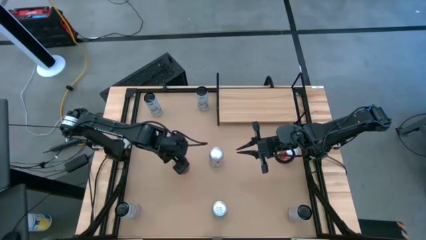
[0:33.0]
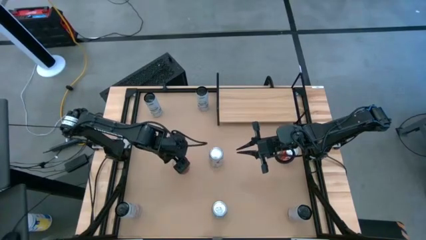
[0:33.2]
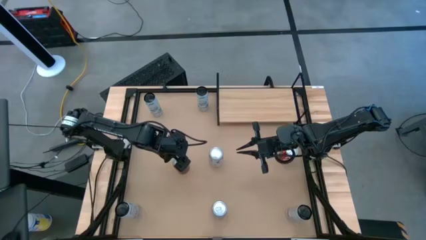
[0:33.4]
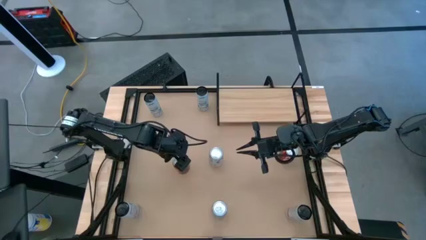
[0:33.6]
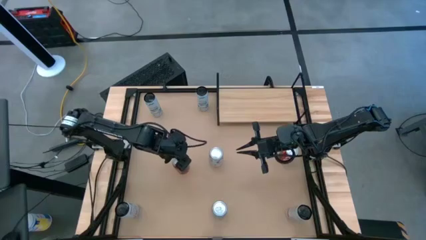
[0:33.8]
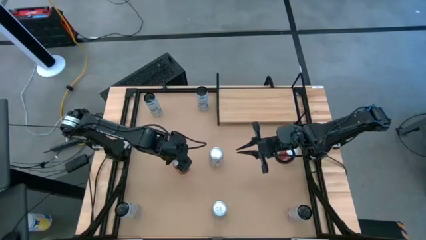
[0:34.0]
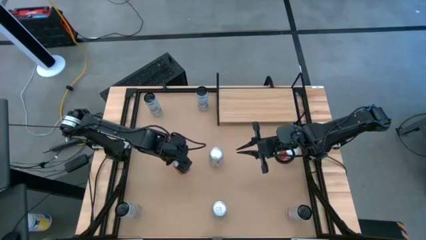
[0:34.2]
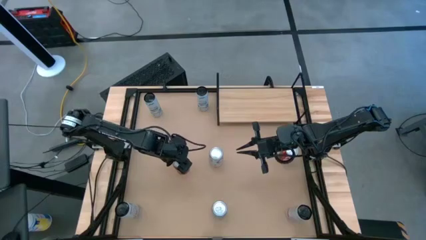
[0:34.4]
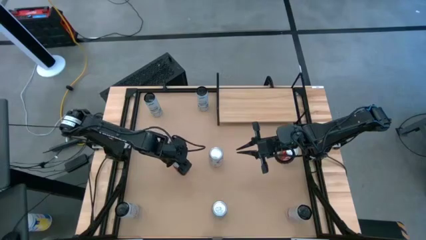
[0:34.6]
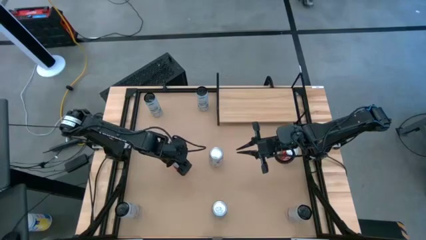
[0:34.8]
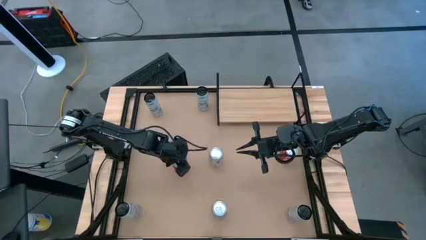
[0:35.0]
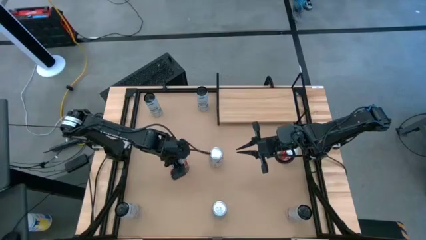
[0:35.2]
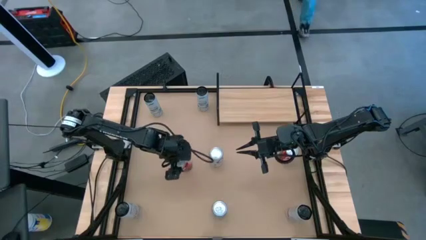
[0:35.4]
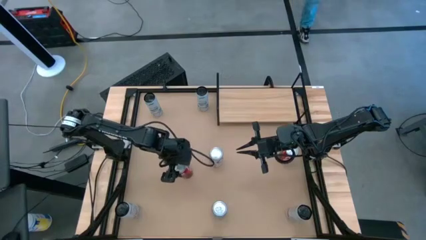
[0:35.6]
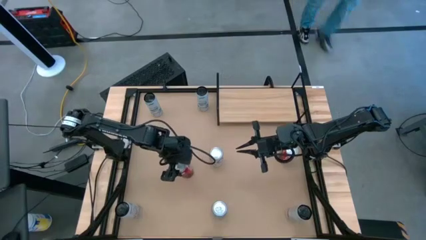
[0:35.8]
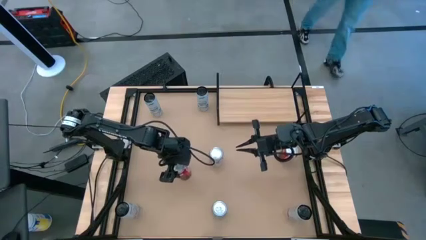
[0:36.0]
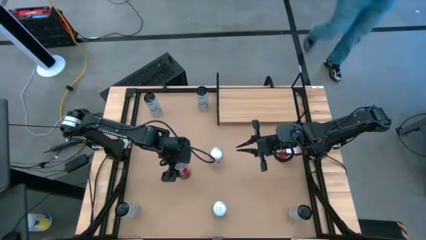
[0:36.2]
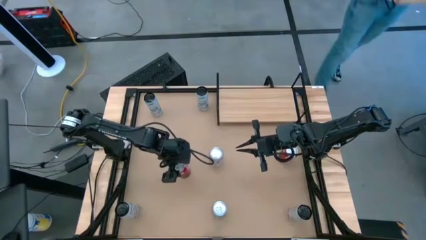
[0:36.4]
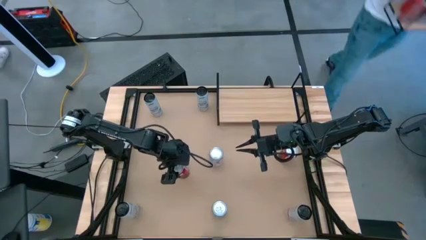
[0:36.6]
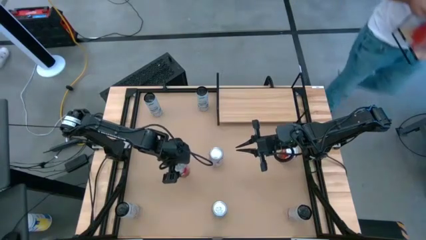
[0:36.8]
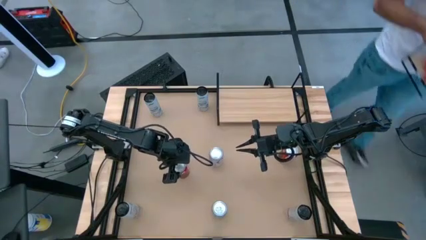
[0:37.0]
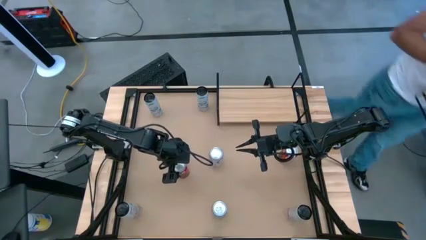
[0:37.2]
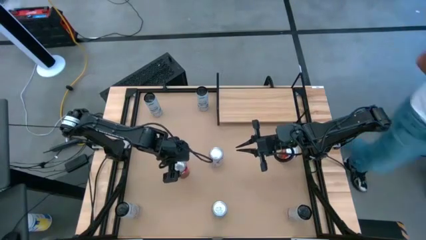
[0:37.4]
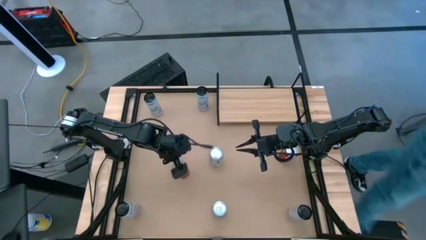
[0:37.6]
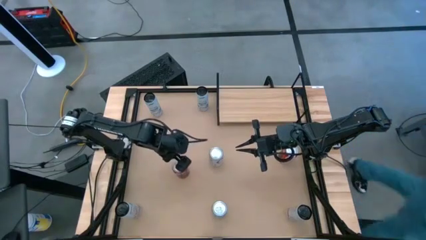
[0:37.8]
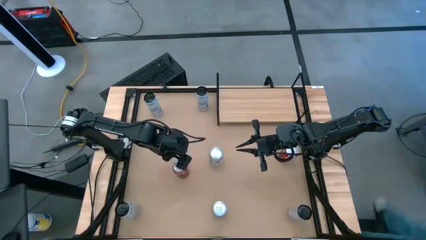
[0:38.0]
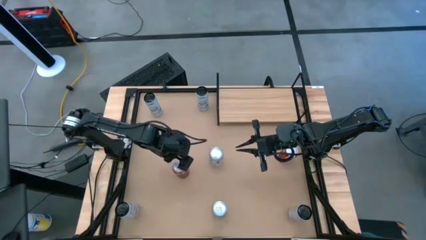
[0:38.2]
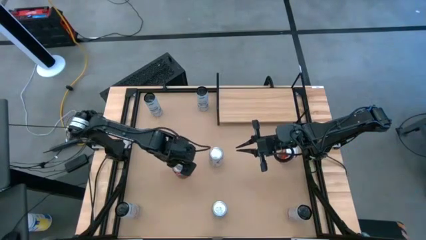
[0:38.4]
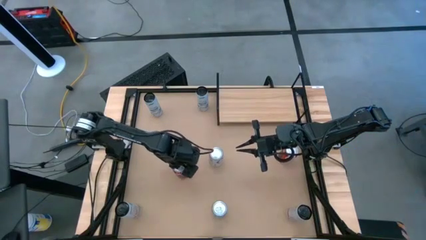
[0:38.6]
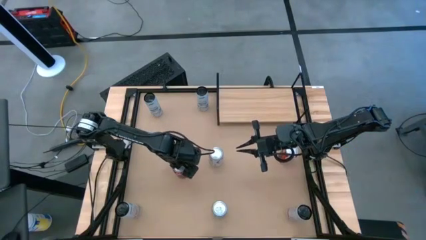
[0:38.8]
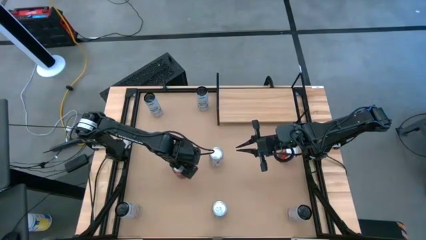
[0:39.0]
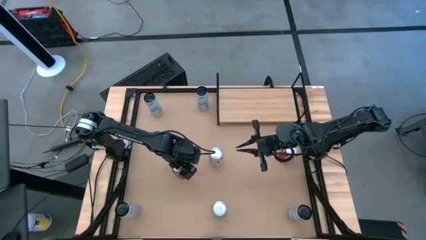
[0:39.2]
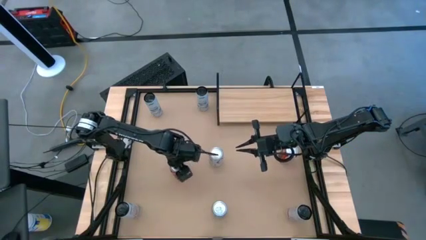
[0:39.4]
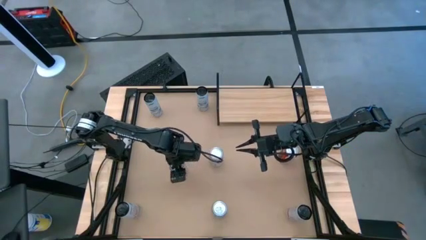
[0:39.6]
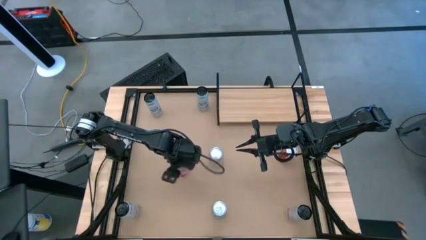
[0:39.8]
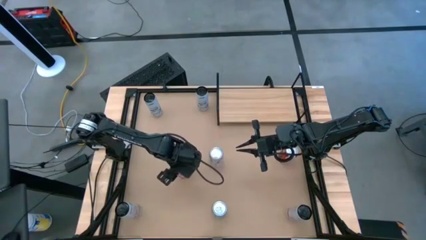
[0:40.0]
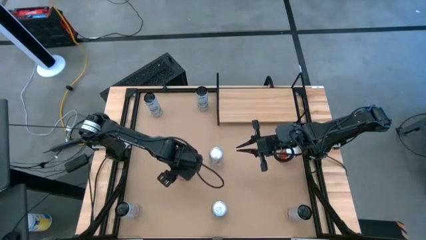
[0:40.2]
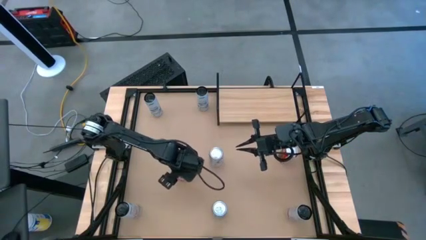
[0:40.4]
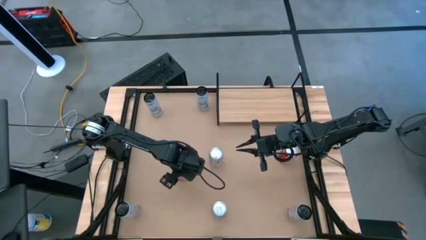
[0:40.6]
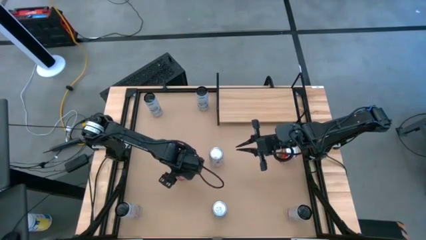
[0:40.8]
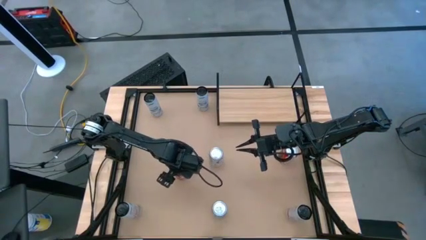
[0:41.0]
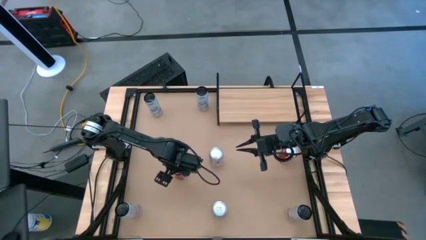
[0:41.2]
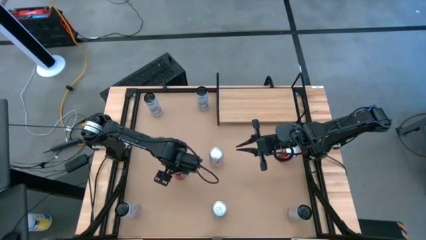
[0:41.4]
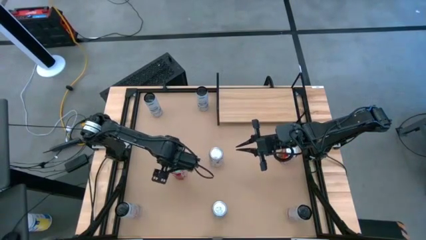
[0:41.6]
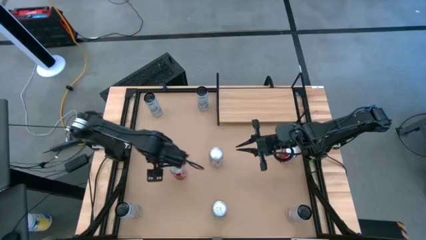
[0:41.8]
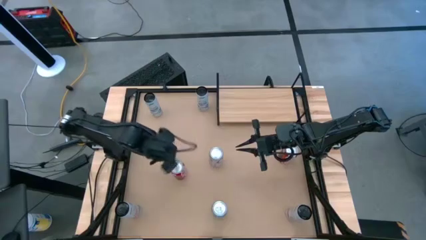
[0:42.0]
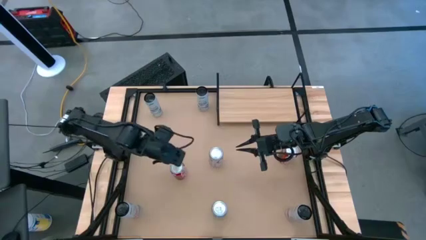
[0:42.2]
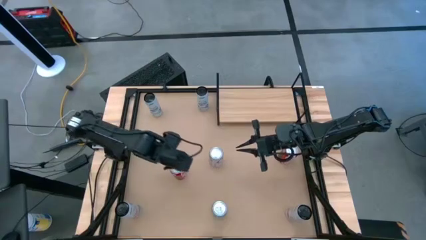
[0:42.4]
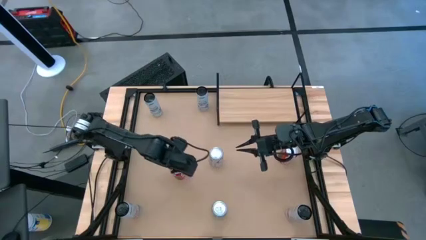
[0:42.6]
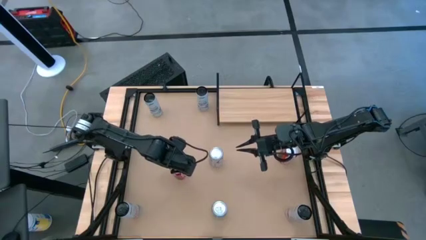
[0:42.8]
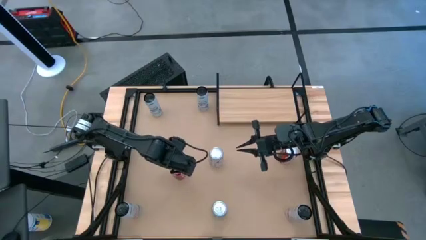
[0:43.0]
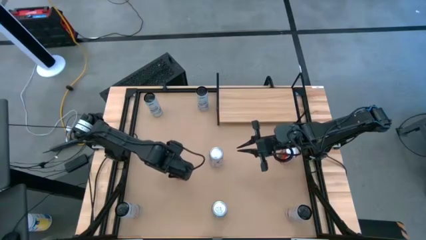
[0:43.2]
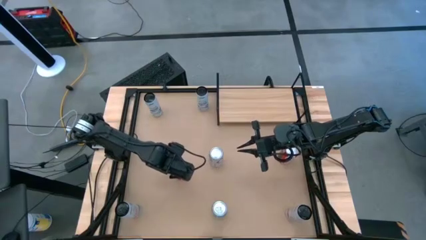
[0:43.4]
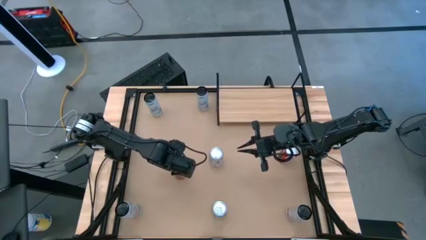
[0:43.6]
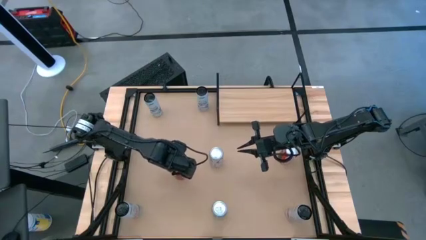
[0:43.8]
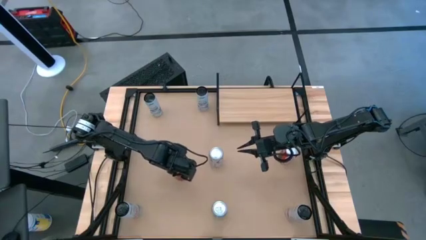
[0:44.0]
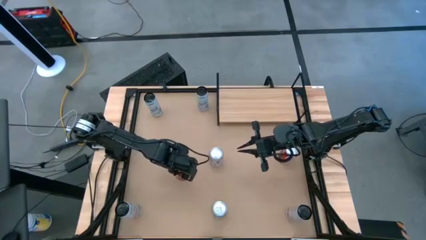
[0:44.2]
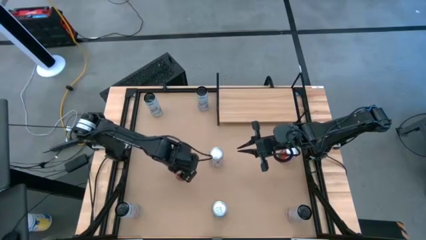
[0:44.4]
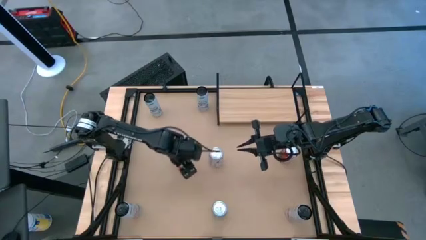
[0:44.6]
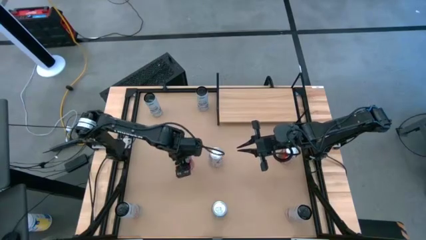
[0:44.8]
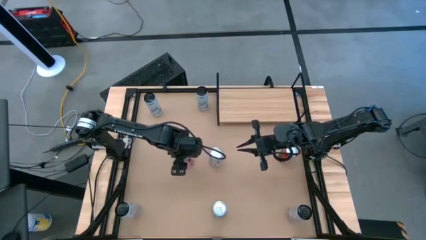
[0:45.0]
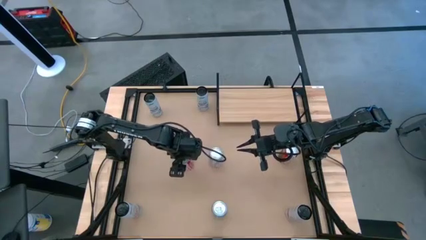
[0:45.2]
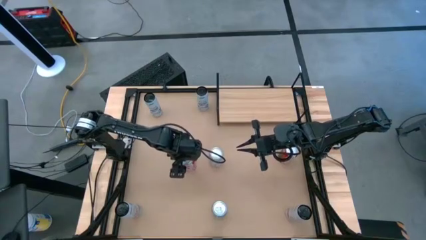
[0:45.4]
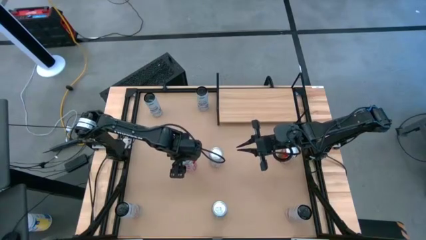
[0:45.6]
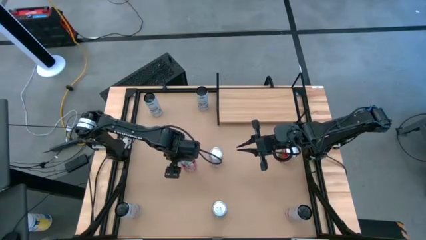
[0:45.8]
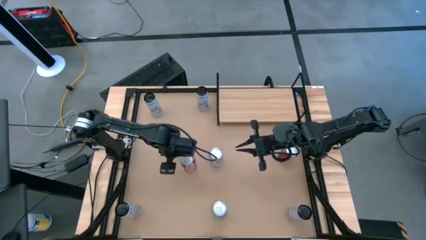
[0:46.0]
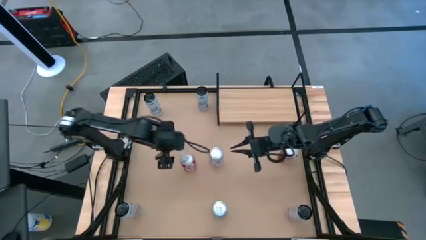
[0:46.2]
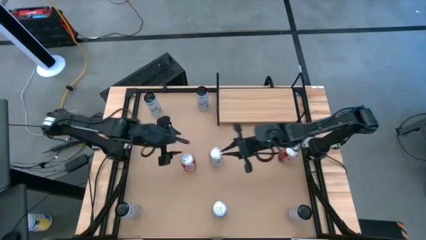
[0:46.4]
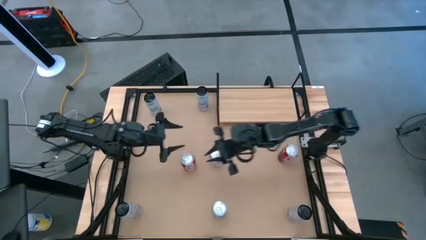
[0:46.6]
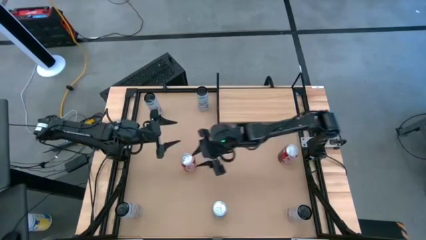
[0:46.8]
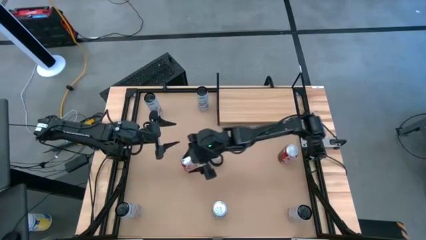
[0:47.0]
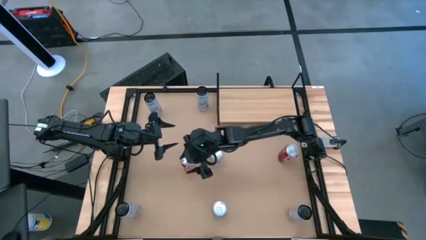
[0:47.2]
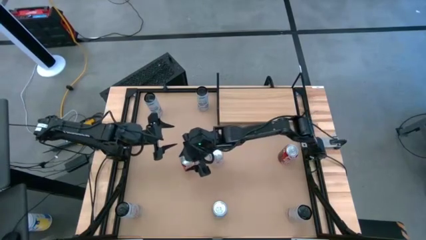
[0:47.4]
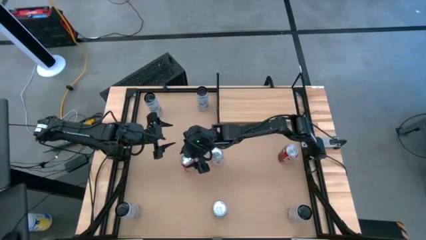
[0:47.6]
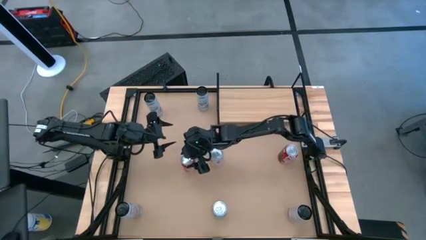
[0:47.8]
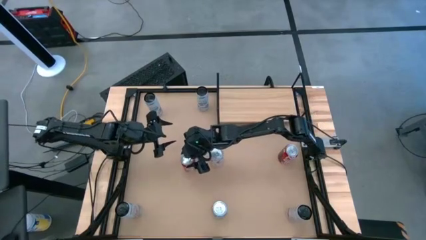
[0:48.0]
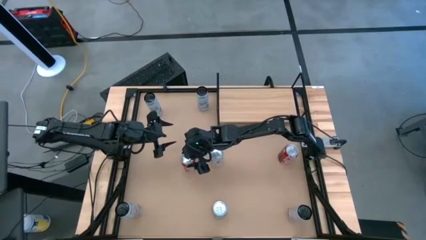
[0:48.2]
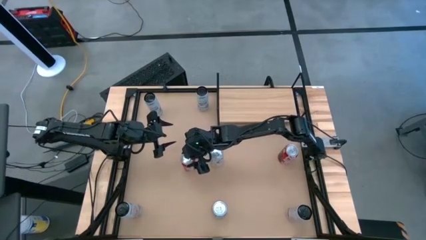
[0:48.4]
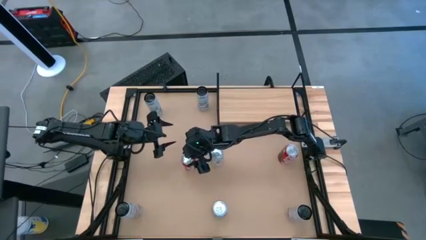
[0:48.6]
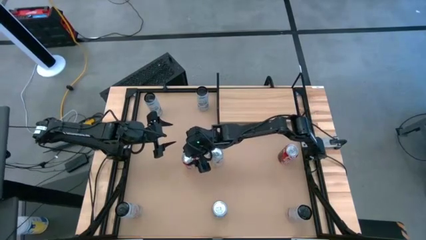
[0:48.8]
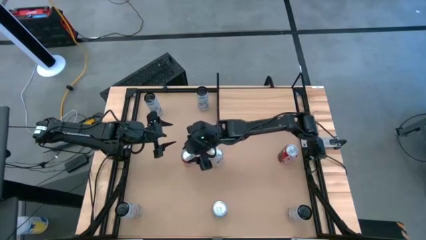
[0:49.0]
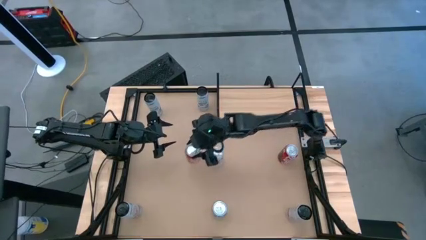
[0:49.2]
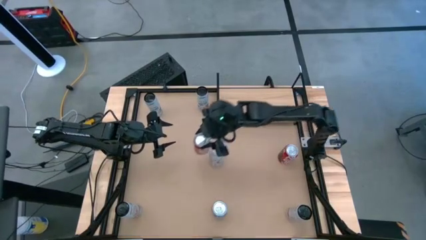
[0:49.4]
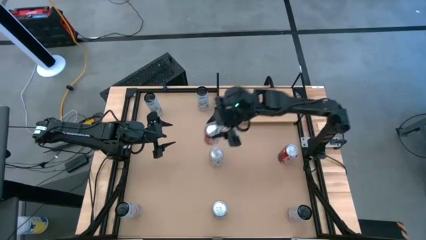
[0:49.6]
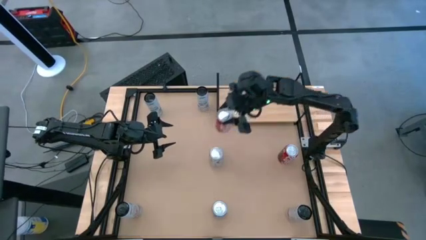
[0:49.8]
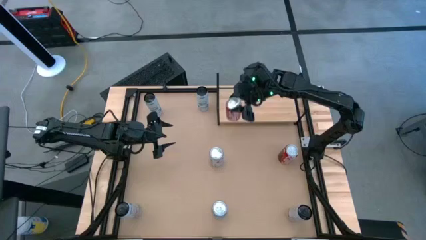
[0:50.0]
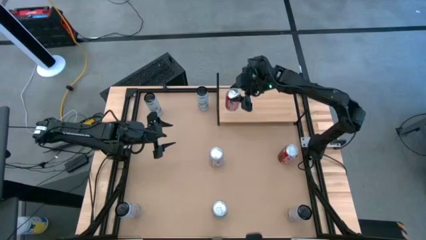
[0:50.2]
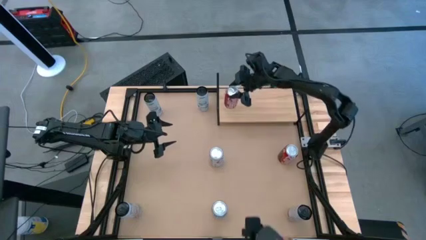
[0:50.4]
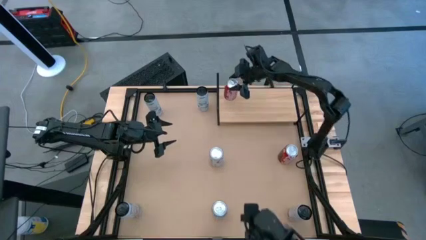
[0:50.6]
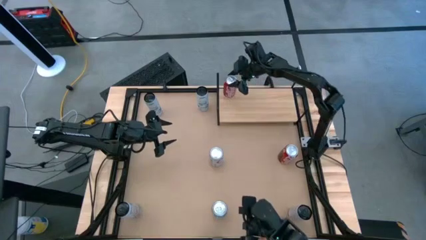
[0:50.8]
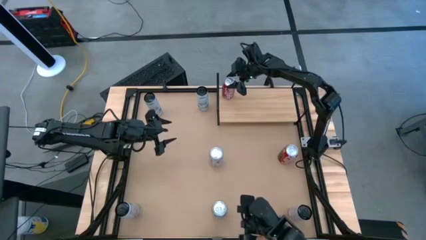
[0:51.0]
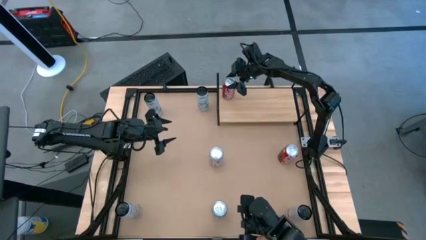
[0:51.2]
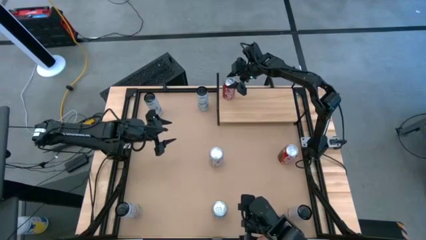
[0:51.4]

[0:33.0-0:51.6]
Task: Place canned beverage on shelf
Put the left red soda can on the shelf
